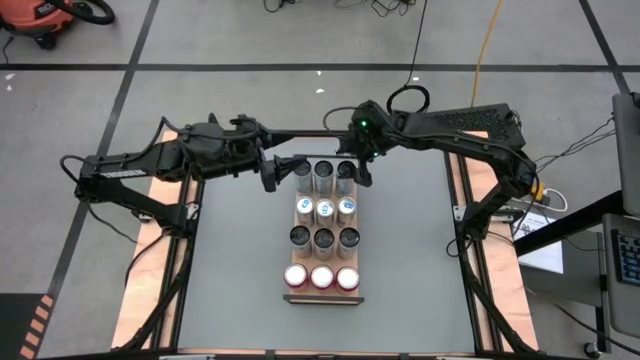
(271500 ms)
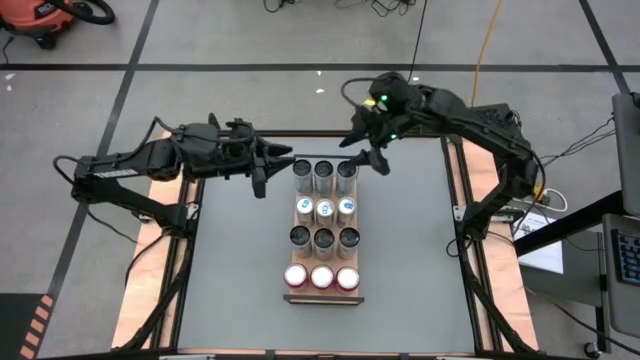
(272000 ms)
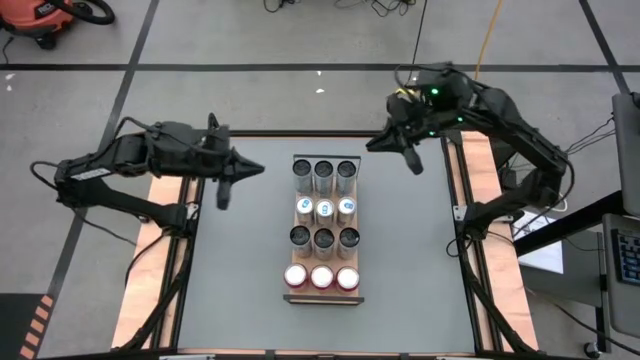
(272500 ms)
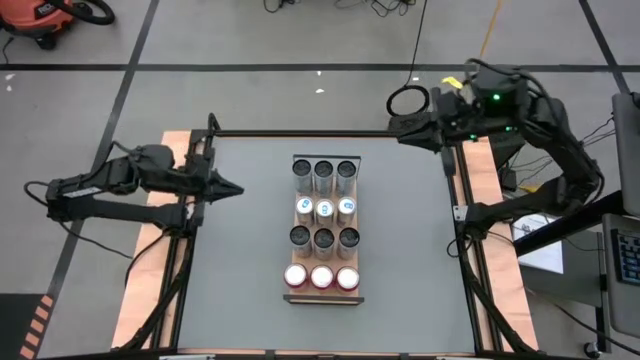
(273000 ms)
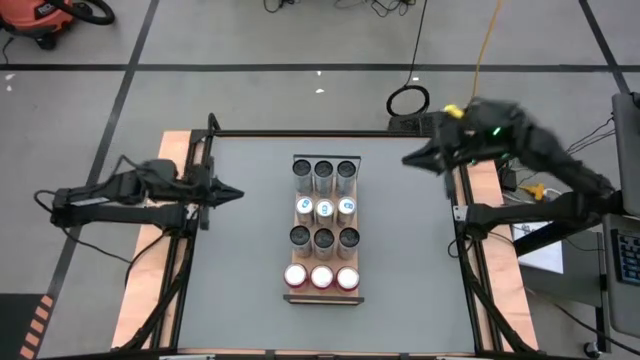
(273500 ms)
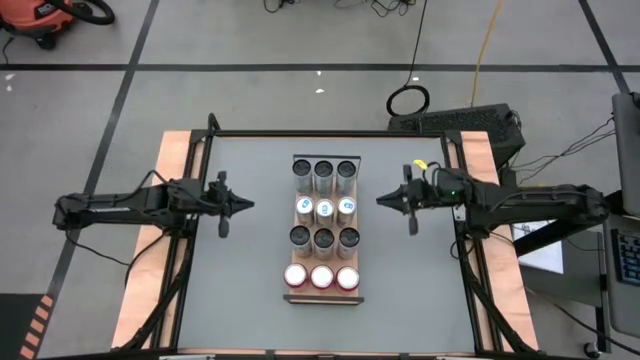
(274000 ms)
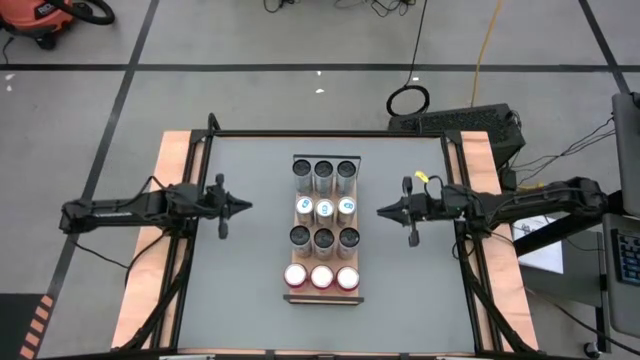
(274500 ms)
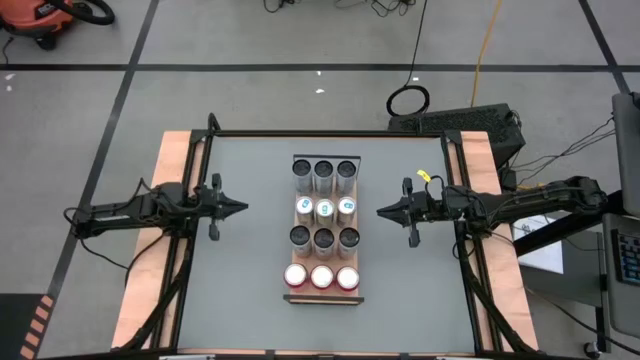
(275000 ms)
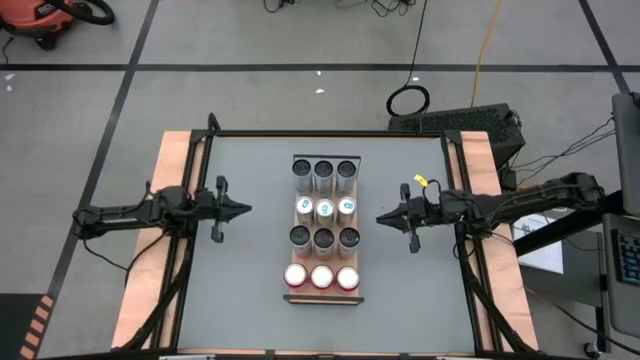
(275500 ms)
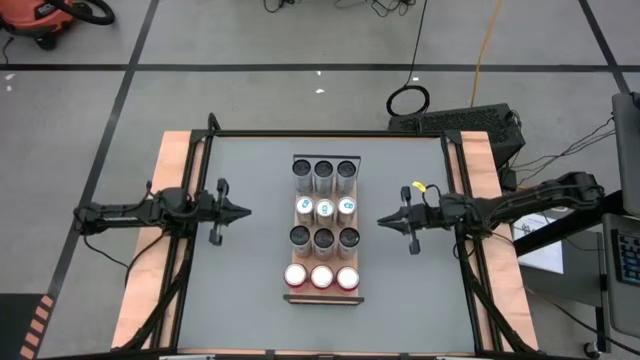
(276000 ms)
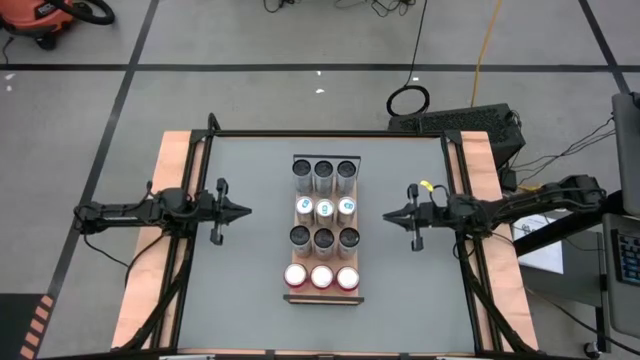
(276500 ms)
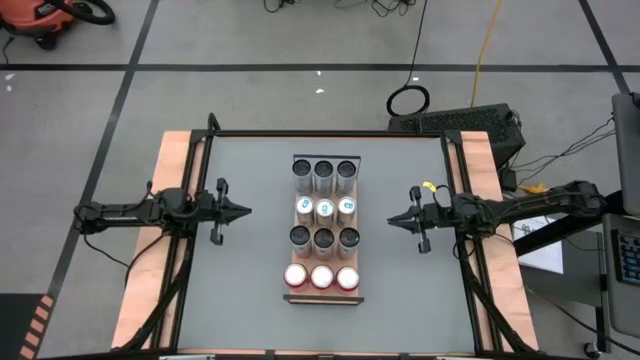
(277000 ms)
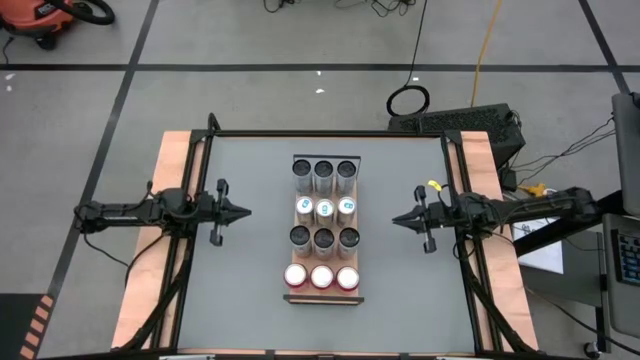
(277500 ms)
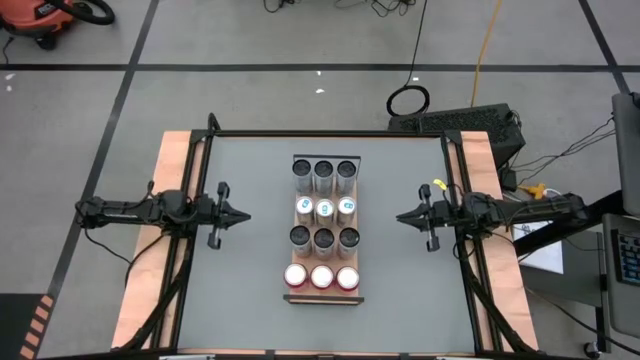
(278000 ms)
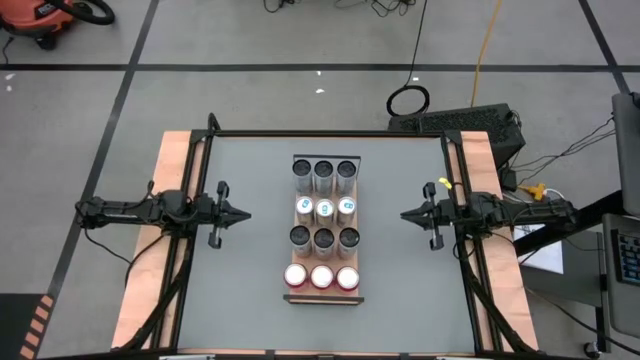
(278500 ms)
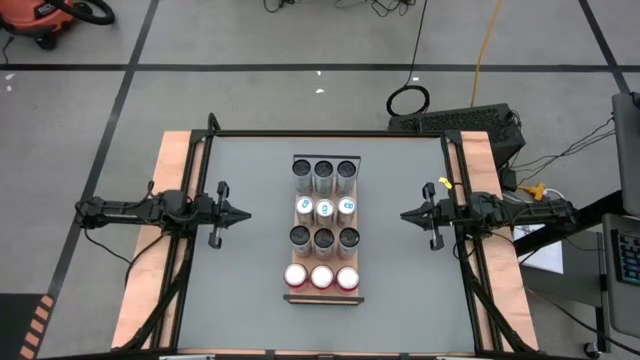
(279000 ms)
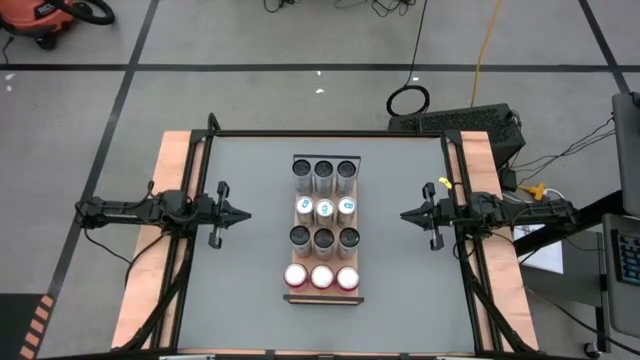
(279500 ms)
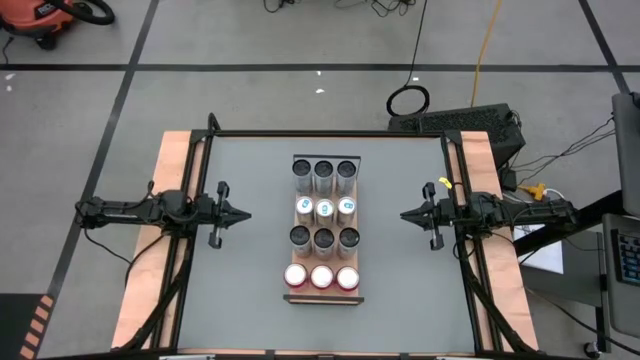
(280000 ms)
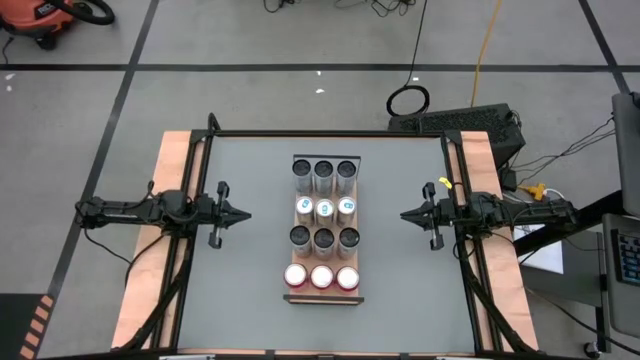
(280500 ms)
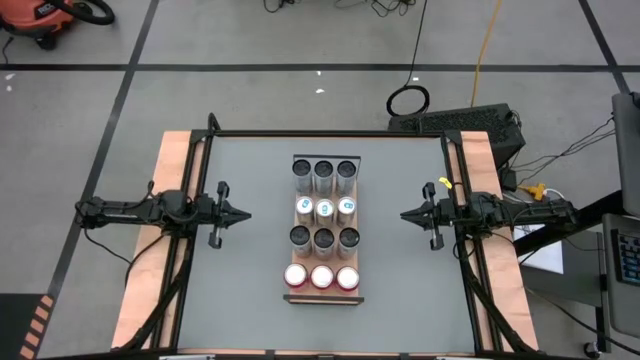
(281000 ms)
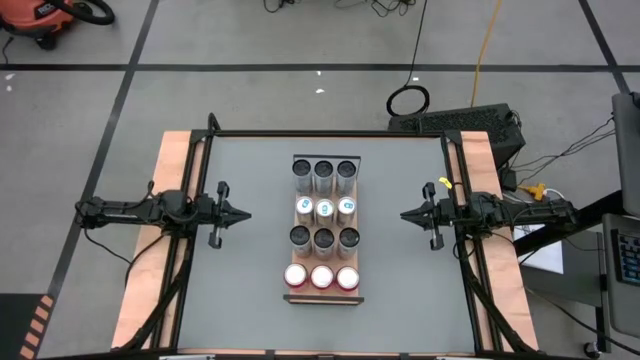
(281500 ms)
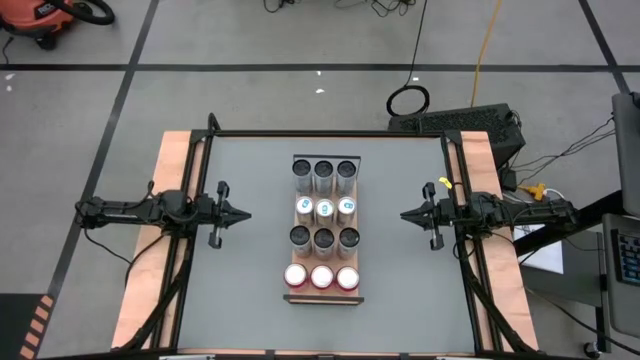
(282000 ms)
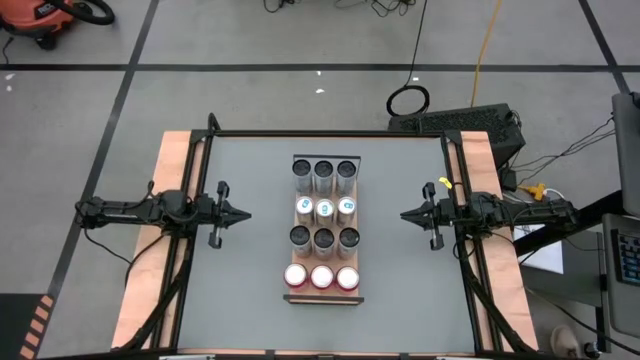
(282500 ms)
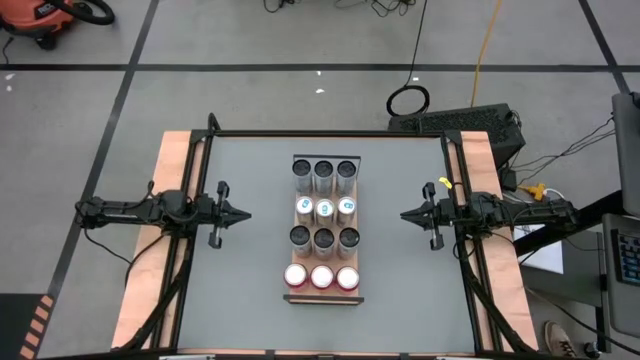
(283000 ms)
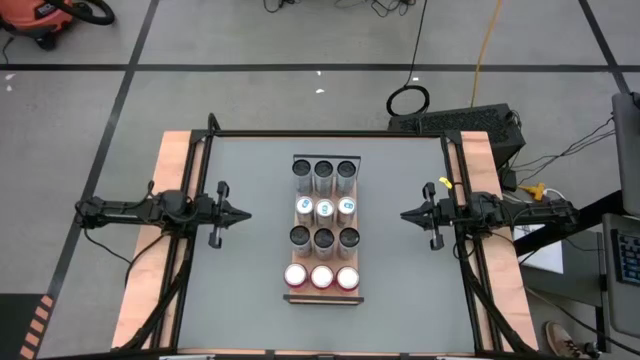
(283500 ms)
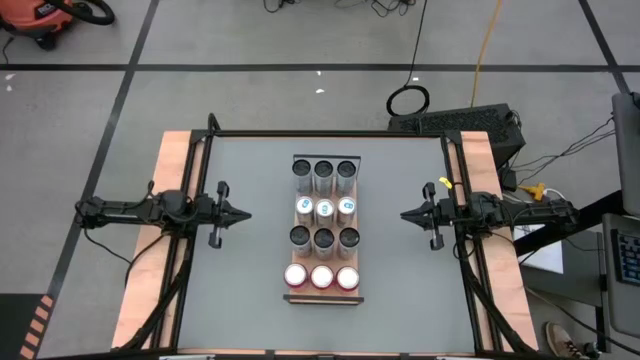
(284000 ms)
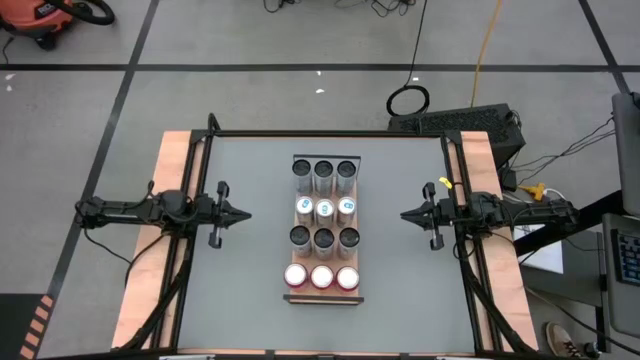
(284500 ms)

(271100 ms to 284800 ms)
Task: Sort soda cans
Return to Home Position
